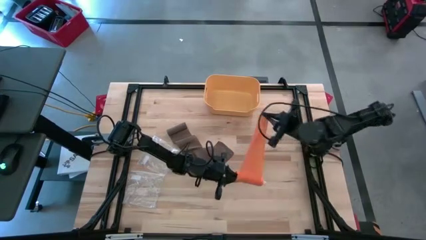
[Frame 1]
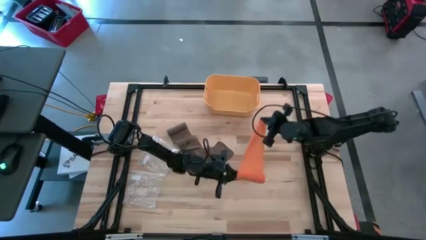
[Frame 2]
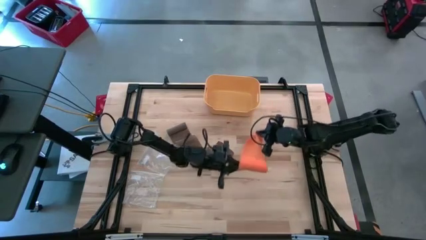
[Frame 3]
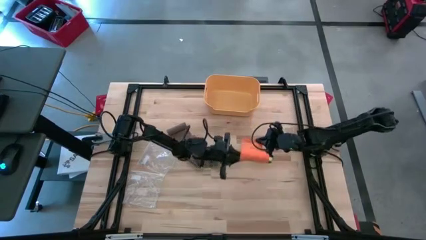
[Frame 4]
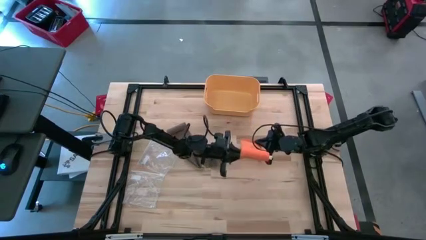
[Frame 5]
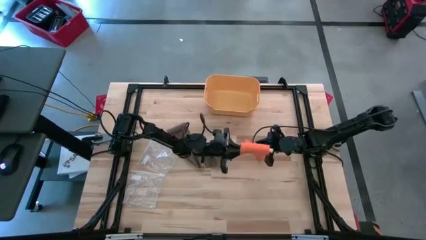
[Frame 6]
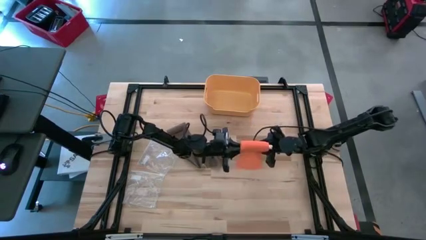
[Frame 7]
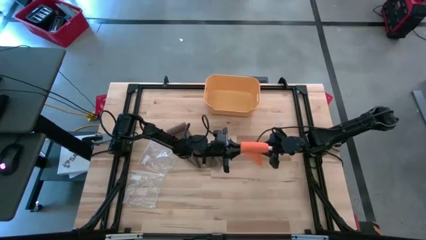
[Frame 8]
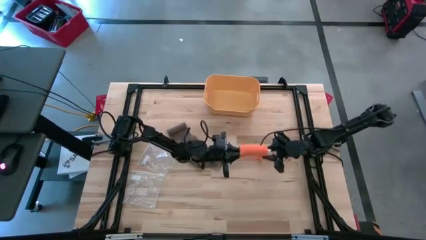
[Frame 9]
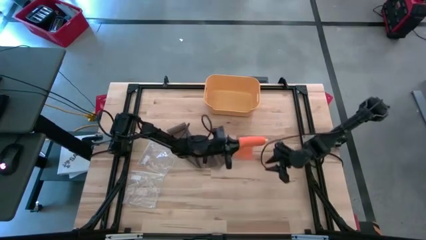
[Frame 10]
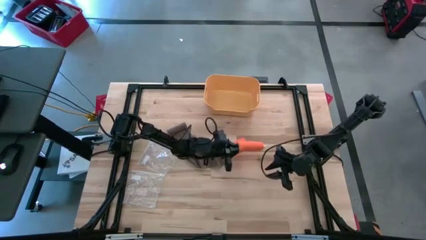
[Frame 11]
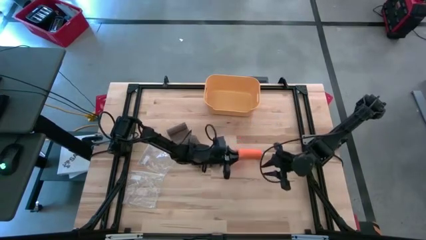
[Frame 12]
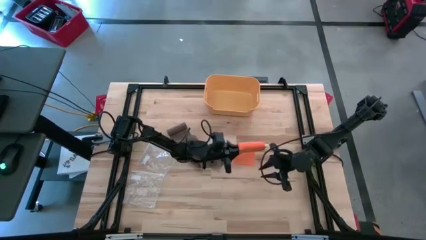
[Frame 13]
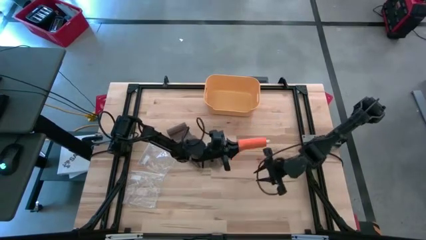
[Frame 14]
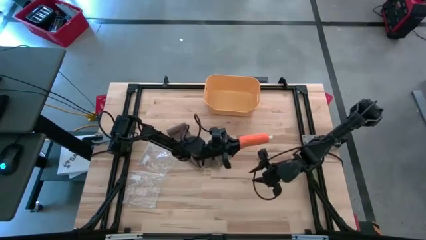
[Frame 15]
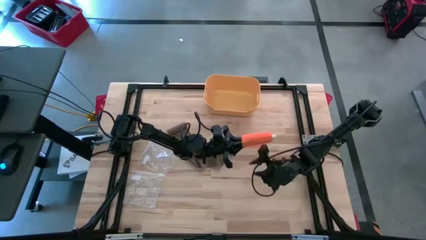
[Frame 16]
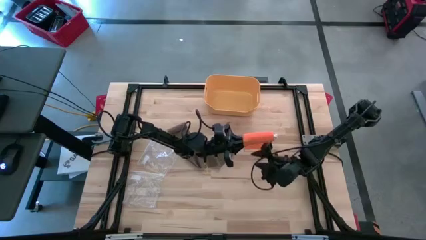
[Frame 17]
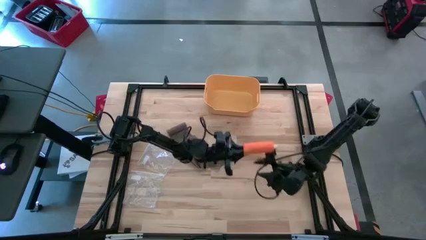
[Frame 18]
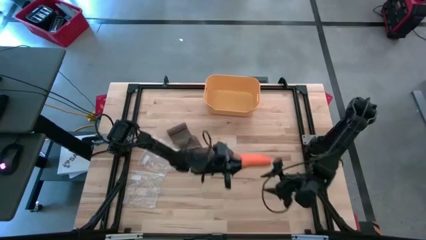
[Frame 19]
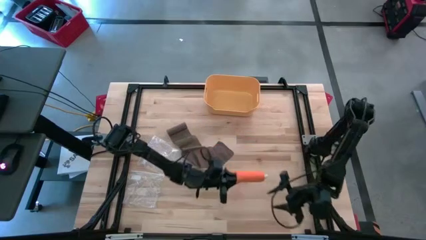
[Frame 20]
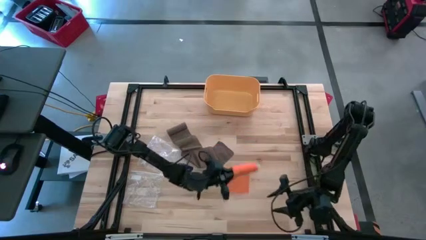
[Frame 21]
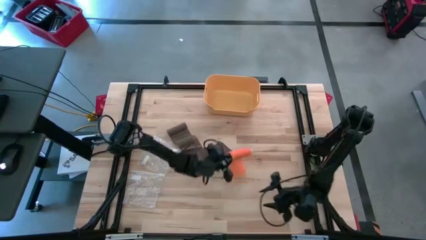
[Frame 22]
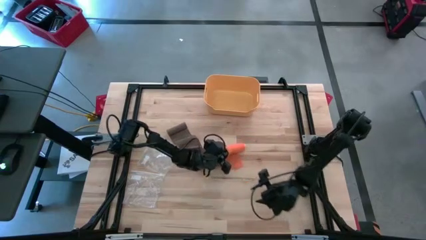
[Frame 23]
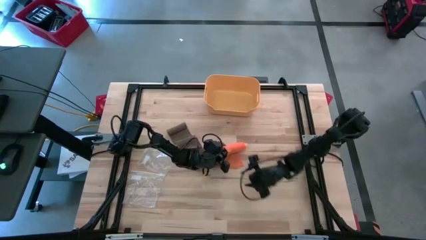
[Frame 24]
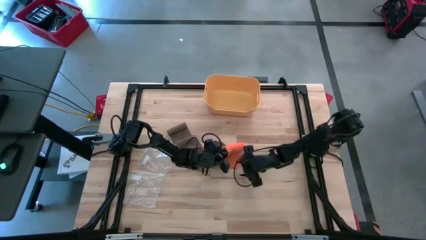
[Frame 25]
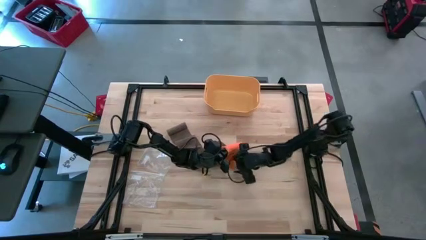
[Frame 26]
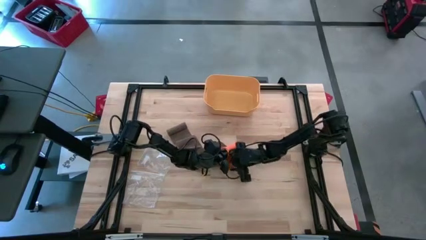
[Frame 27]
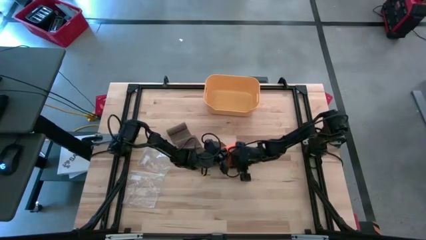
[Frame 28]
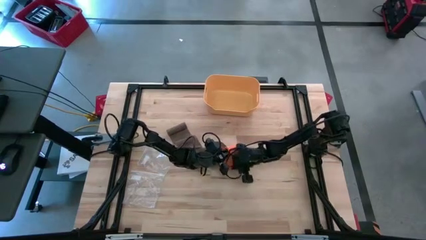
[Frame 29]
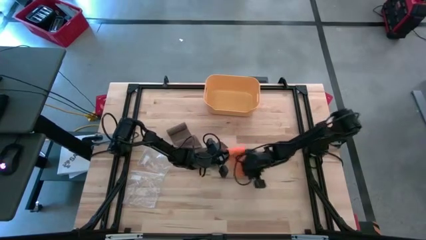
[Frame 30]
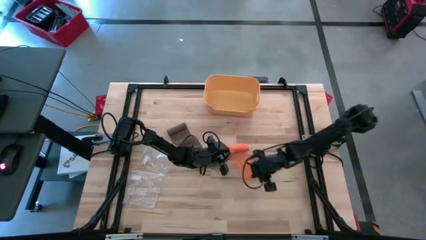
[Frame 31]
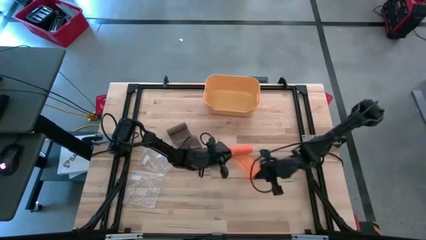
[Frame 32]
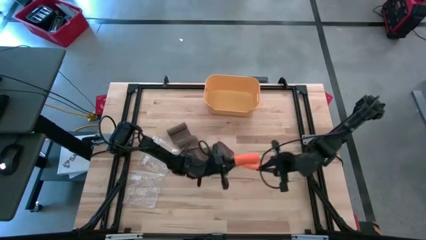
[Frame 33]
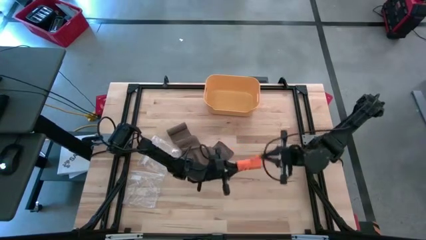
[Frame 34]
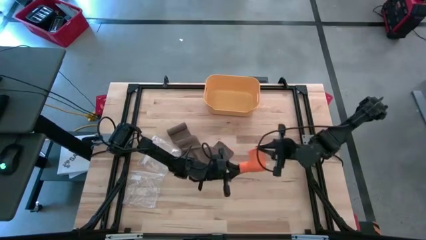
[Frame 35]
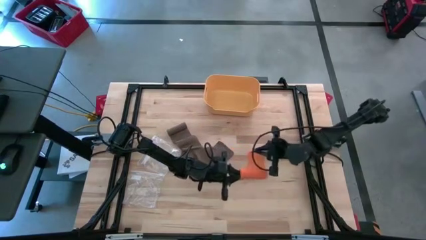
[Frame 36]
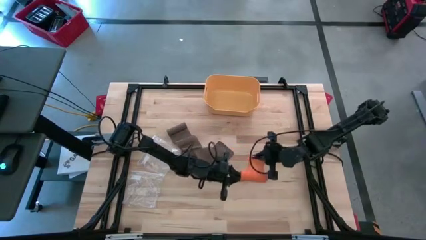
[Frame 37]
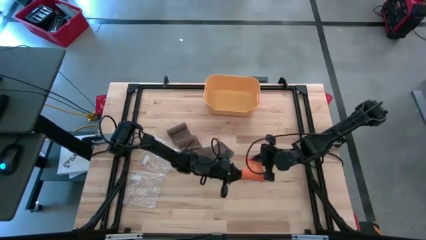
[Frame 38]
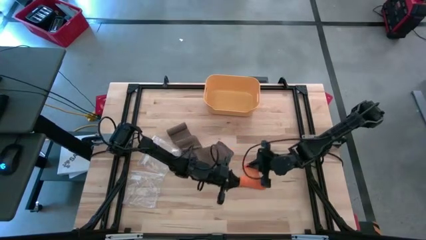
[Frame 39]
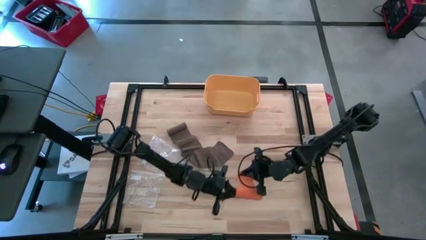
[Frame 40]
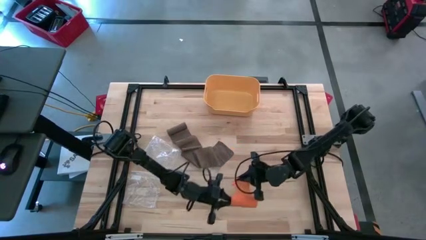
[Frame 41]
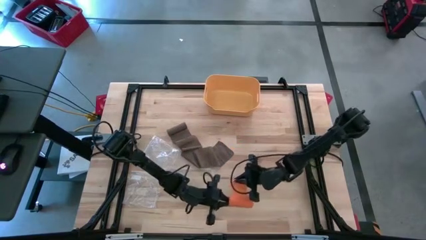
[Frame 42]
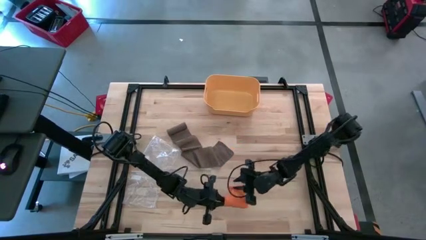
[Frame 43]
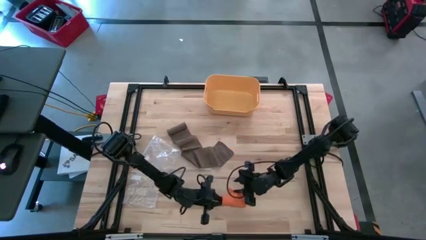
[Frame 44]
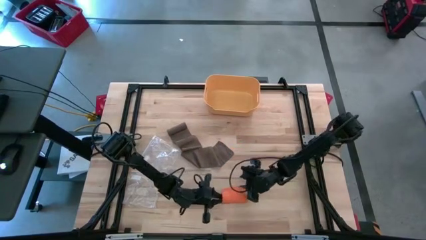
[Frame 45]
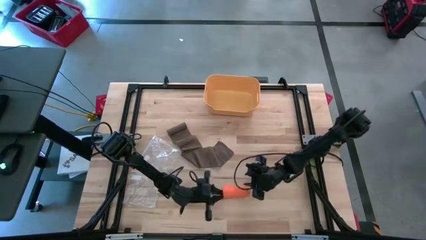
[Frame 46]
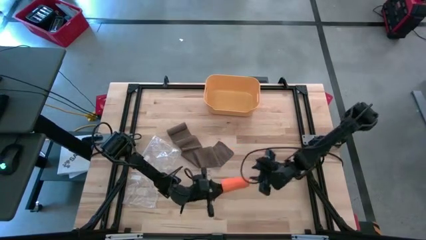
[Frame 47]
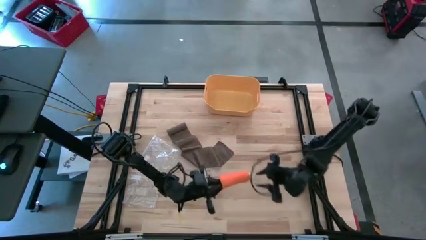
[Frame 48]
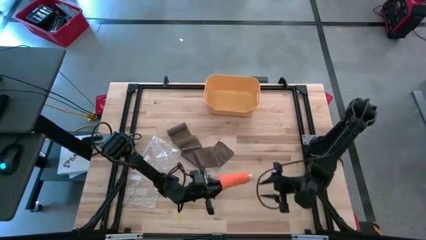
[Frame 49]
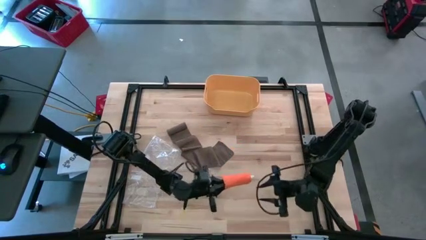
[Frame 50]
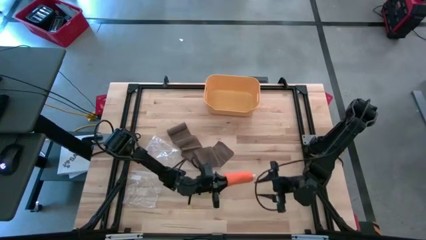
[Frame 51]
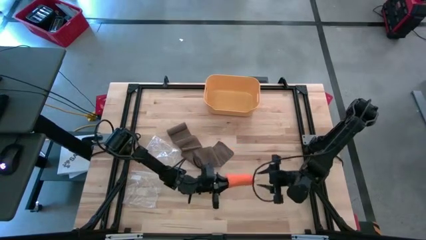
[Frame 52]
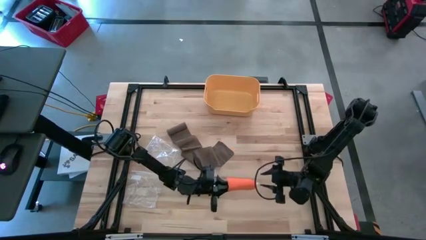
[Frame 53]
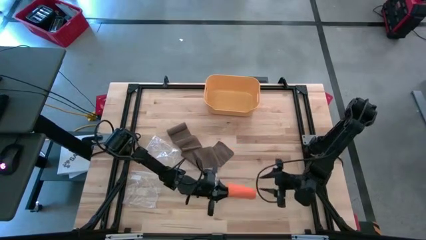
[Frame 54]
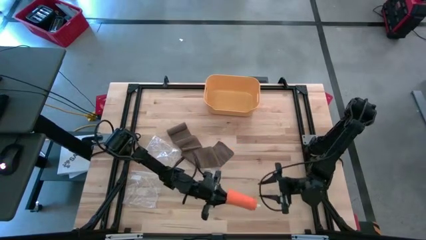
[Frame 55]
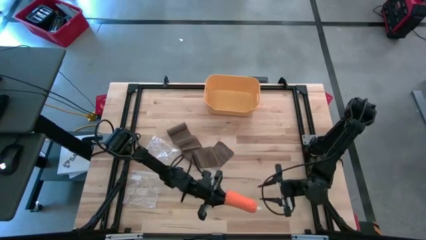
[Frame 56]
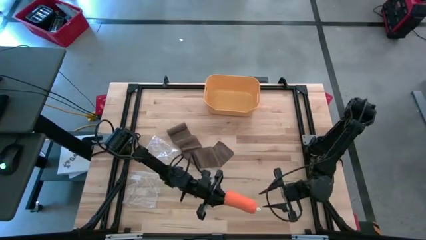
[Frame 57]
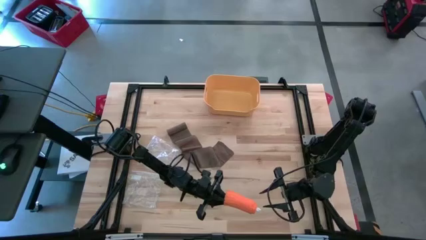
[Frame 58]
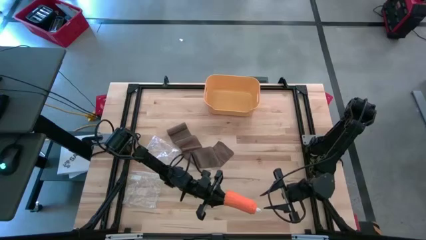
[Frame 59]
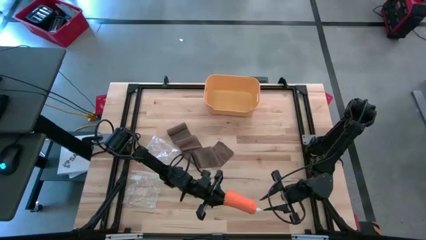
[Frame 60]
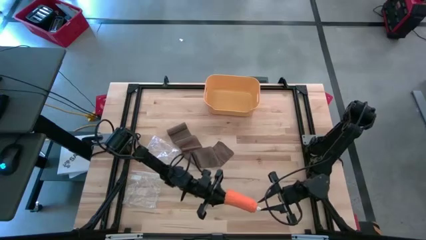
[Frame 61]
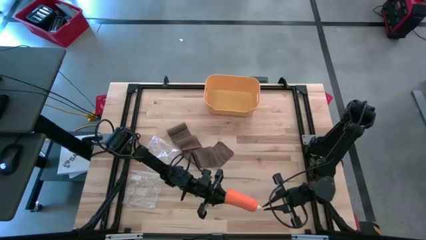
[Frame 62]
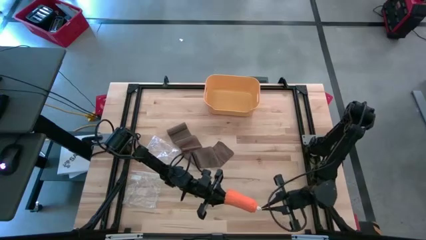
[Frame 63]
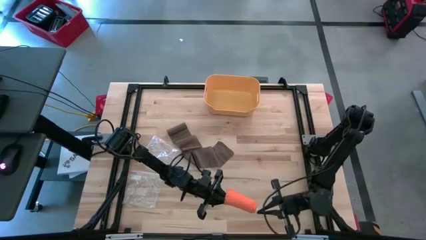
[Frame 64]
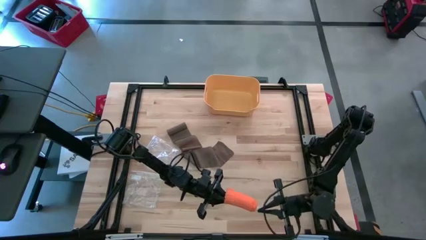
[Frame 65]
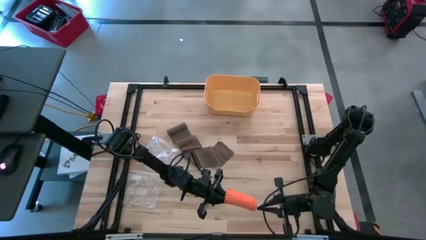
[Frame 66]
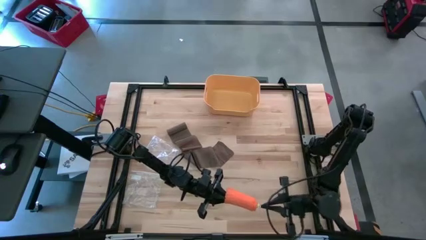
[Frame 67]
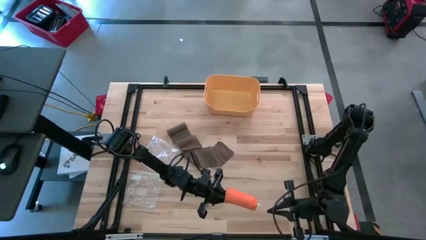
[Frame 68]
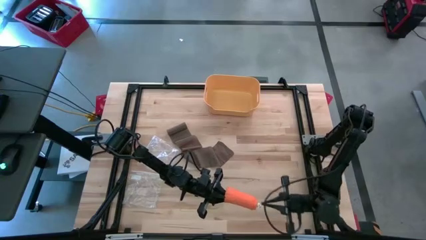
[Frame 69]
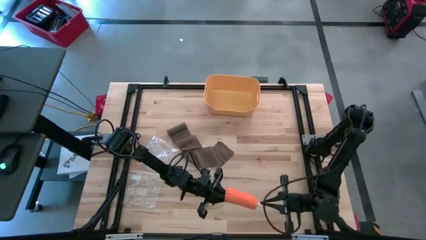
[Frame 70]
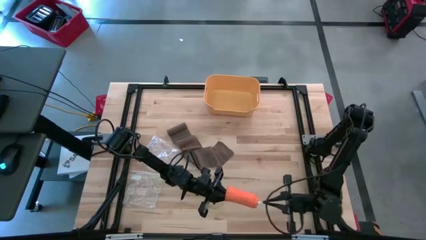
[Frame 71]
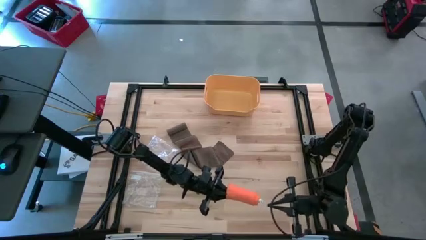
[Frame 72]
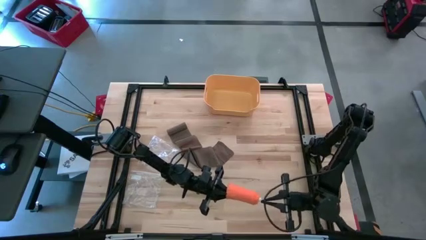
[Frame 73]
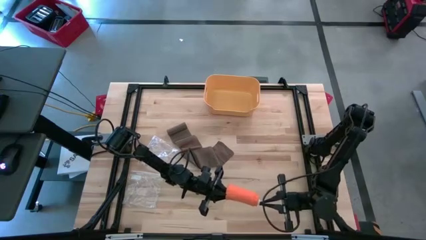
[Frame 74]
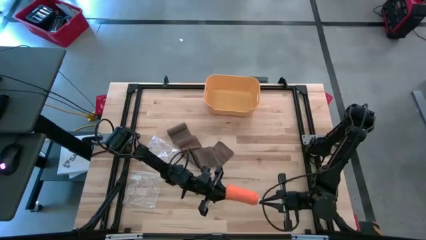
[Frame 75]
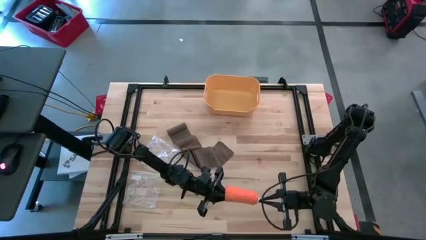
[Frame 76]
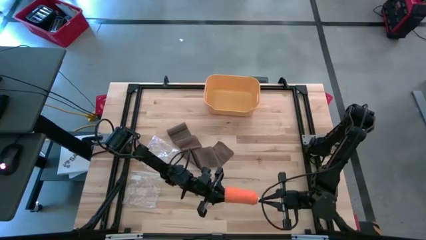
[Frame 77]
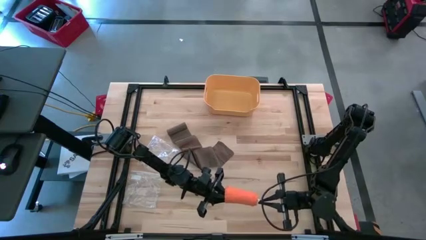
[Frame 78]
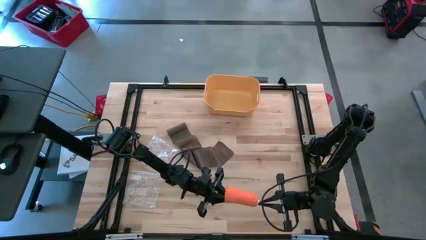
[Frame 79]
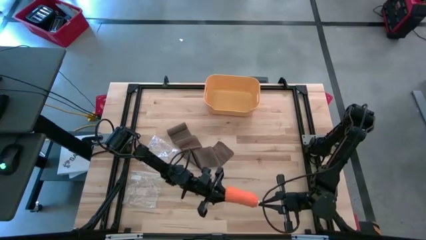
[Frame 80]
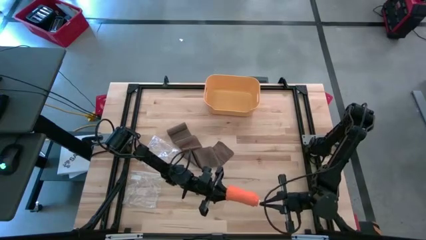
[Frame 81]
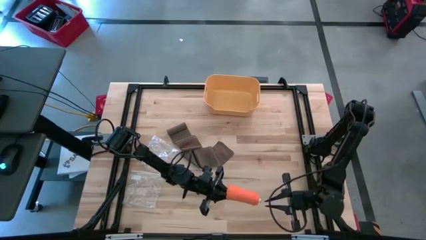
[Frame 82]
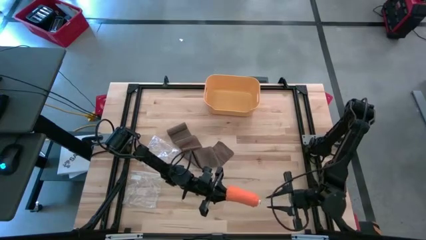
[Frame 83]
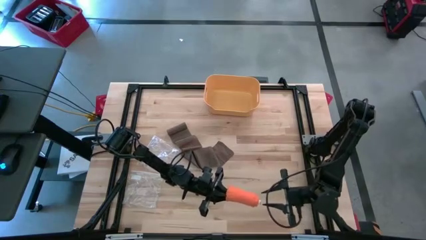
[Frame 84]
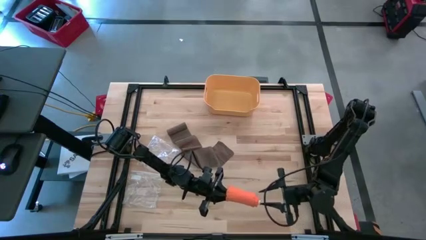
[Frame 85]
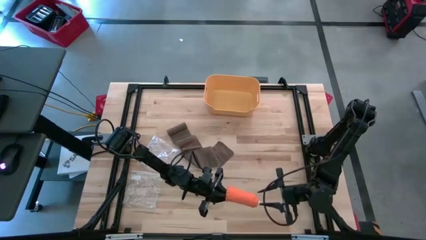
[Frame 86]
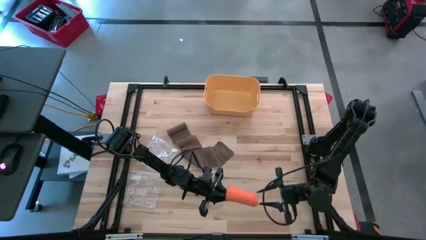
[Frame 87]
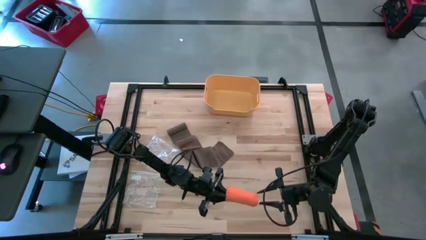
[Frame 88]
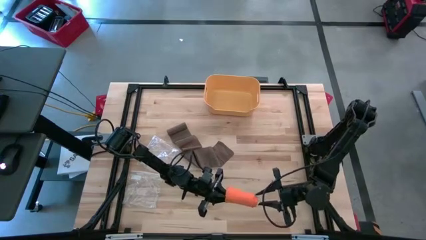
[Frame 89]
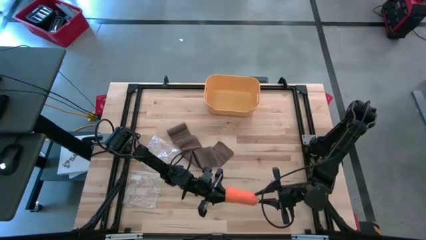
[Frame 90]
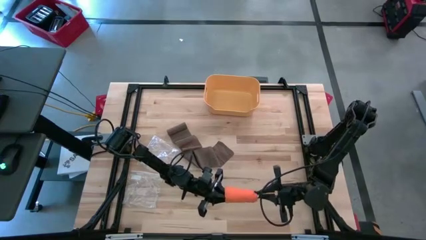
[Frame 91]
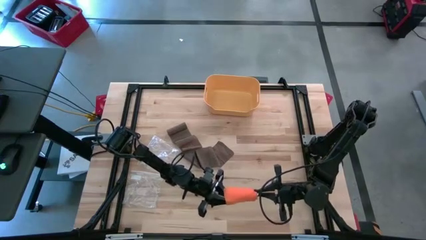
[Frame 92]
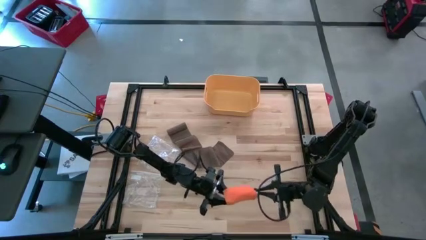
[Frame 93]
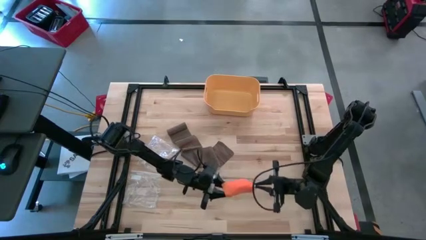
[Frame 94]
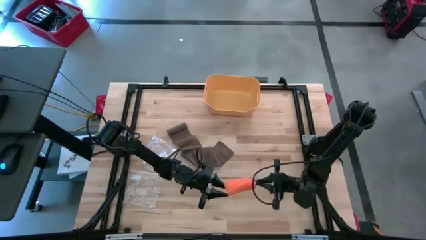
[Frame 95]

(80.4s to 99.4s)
Task: Roll bandage
Roll the orange bandage
